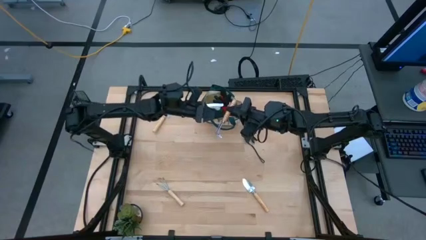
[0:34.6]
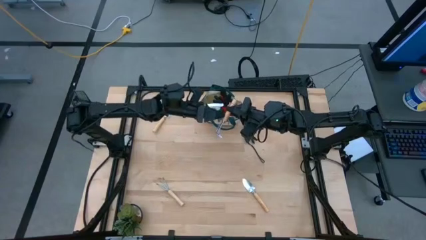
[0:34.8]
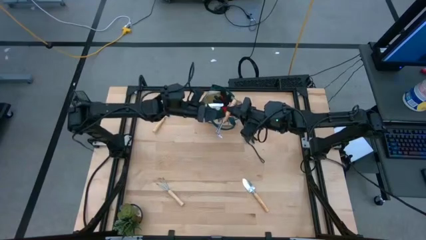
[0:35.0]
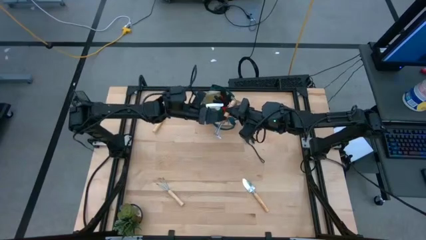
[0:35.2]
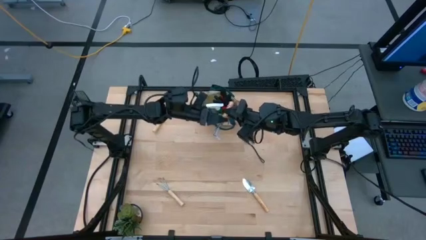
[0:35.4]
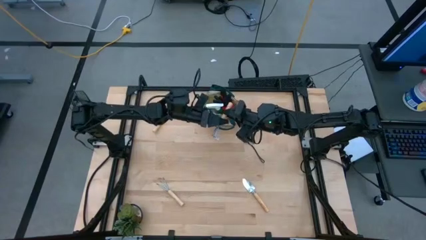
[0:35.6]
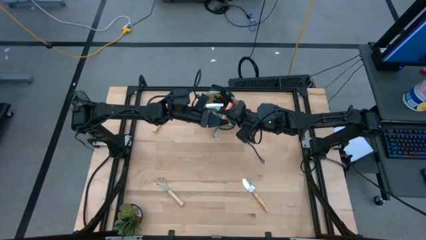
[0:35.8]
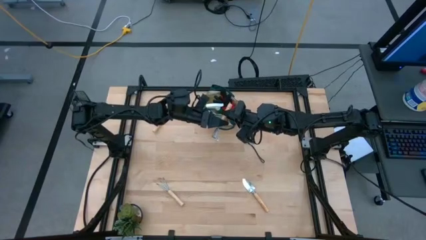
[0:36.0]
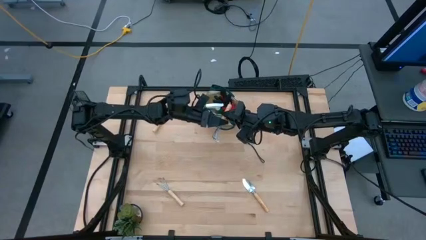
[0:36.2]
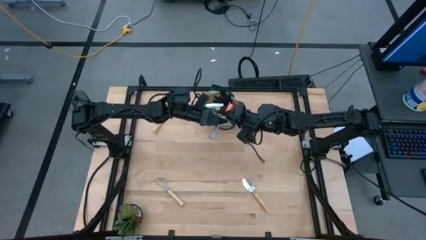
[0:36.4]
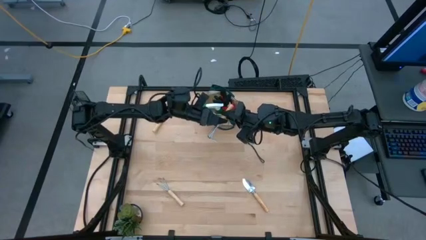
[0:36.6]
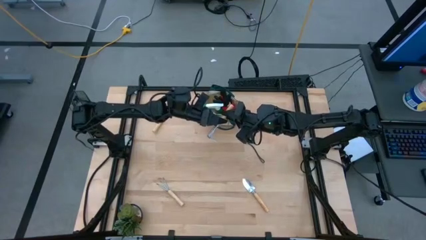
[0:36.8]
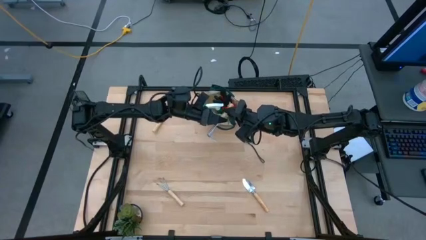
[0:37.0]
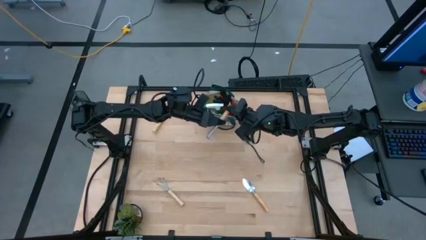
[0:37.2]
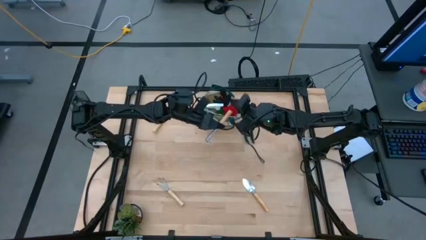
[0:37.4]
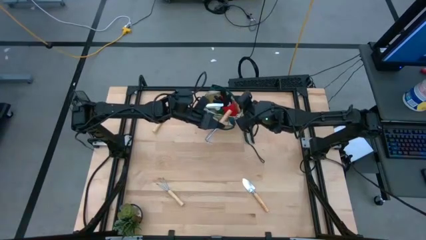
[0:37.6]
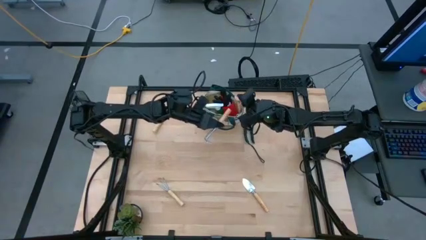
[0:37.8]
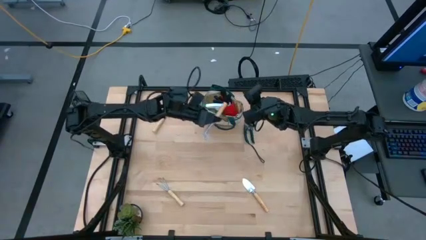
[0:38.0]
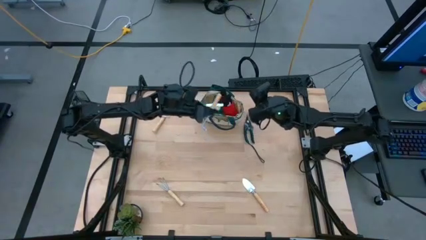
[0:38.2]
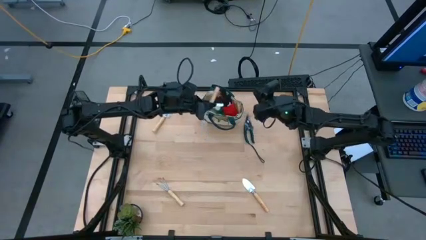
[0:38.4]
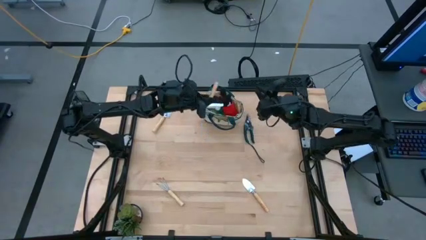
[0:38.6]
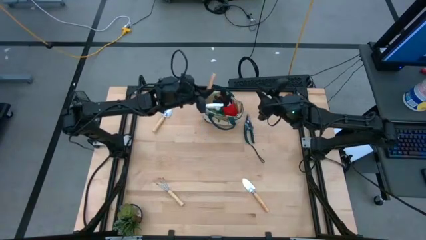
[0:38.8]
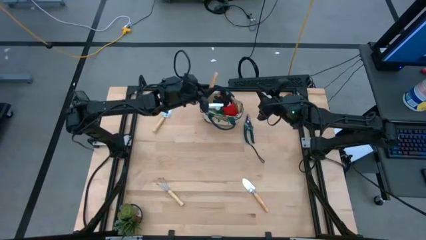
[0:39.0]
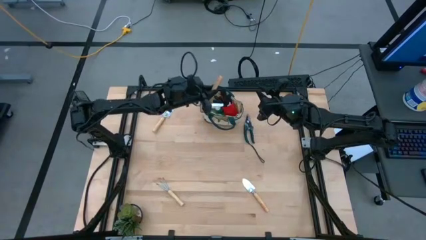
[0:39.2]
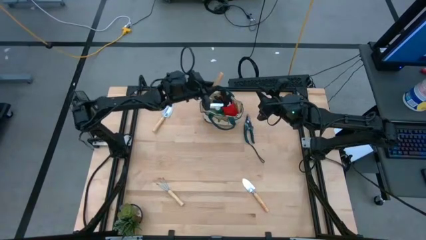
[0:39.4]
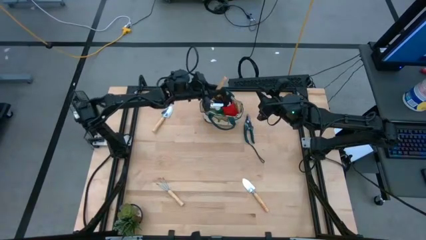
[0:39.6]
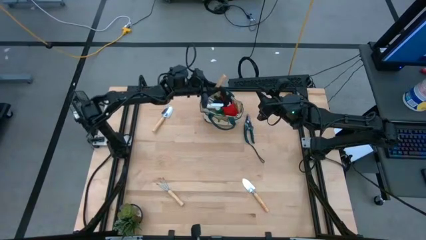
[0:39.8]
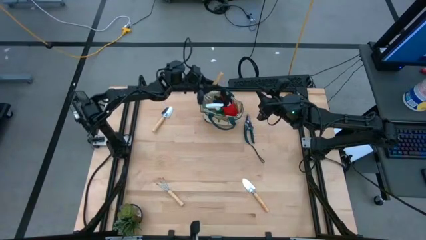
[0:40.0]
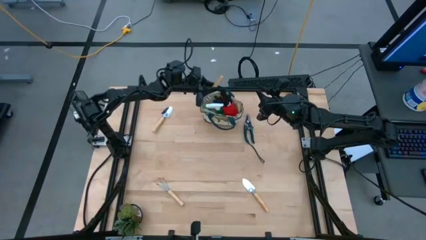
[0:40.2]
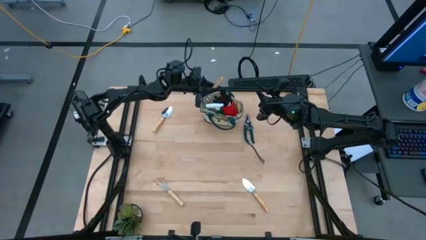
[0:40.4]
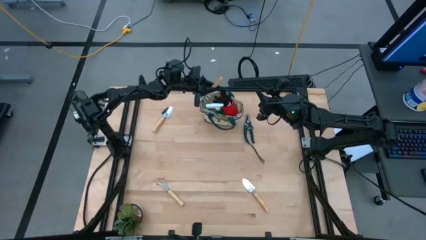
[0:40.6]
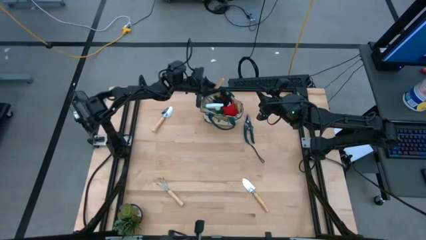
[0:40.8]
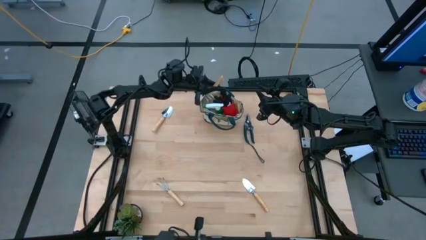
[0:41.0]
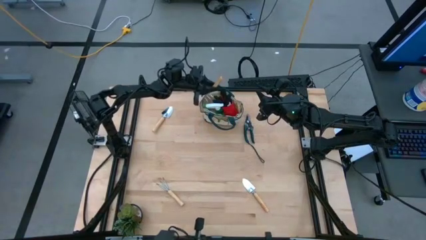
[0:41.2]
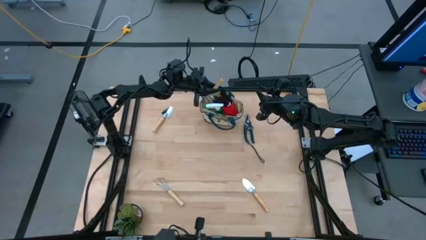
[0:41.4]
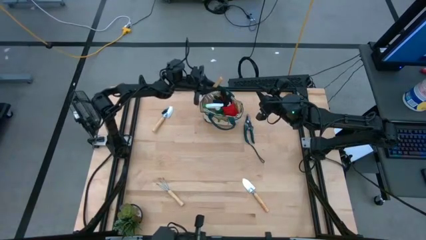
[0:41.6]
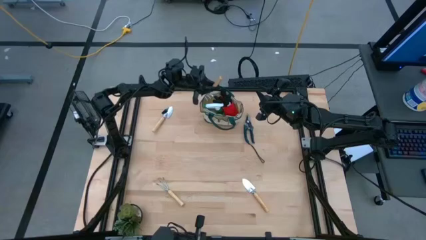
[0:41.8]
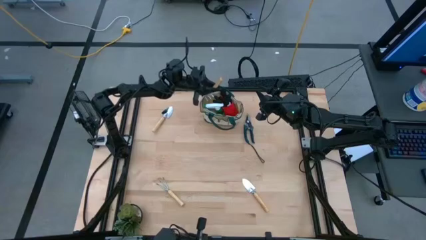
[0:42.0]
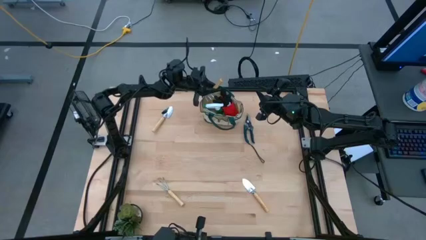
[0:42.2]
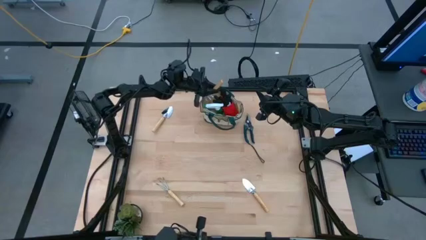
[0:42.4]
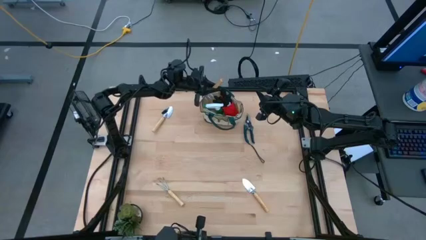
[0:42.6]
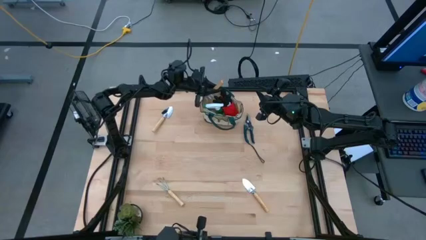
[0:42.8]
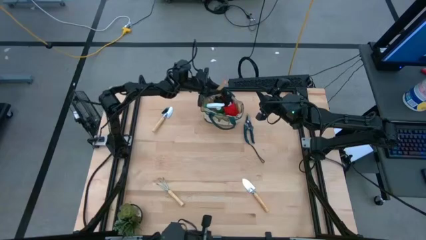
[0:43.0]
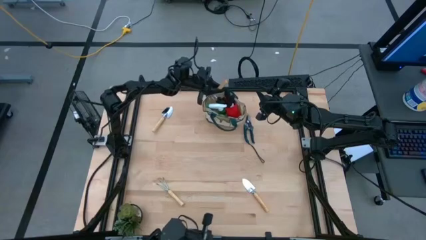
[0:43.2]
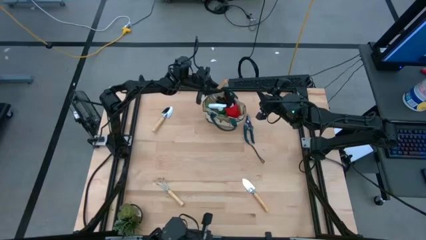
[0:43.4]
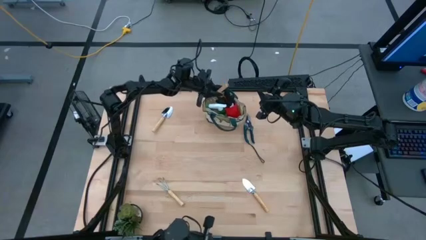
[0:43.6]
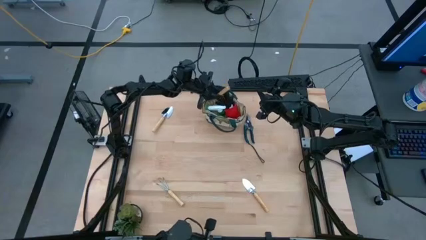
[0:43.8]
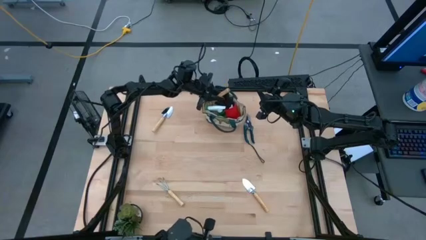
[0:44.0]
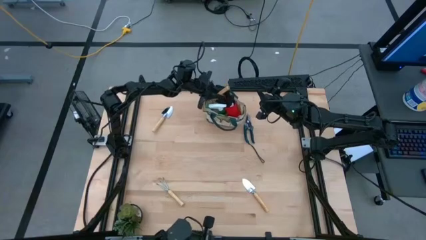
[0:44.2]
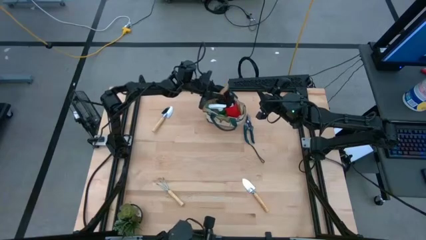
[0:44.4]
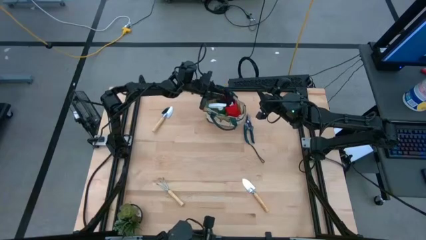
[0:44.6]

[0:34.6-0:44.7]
Task: Pick & Place Garden tools in Gardening bag
Put the right brown hand rake into the green gardening bag

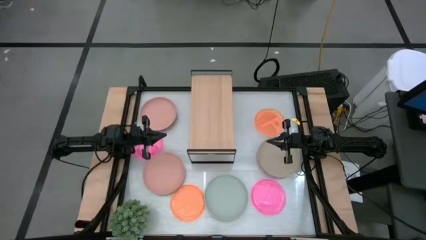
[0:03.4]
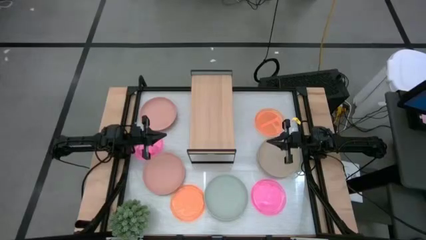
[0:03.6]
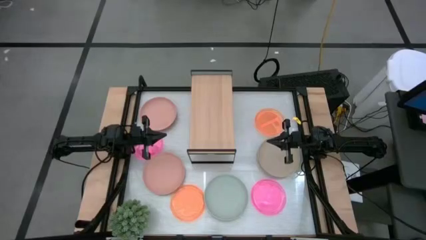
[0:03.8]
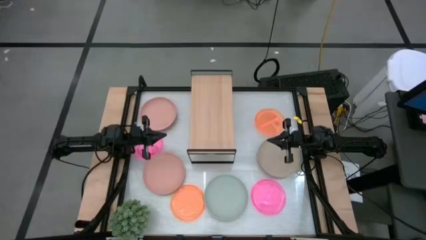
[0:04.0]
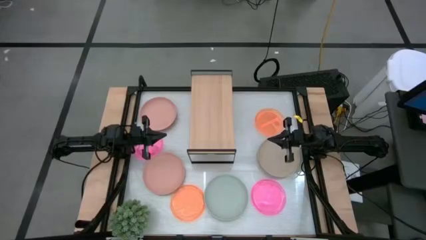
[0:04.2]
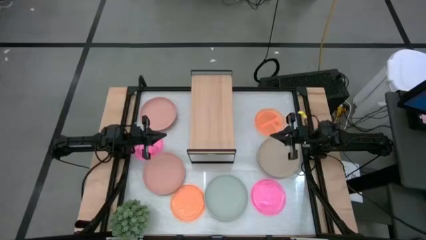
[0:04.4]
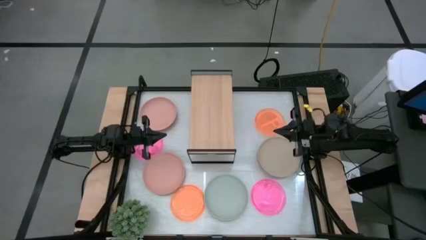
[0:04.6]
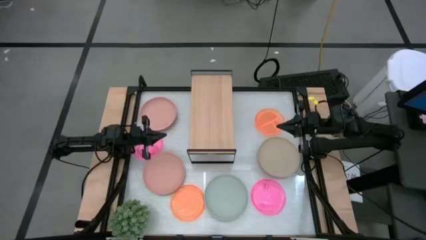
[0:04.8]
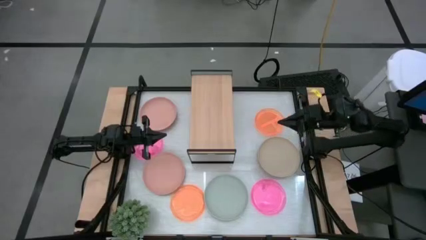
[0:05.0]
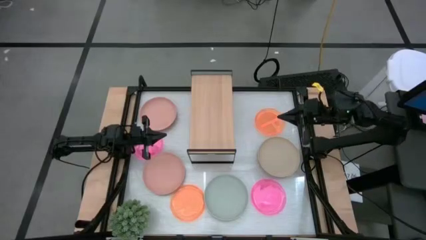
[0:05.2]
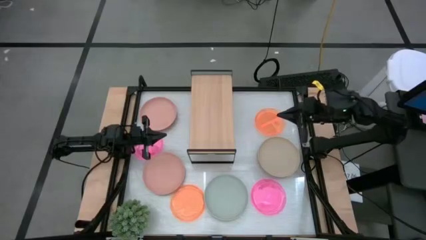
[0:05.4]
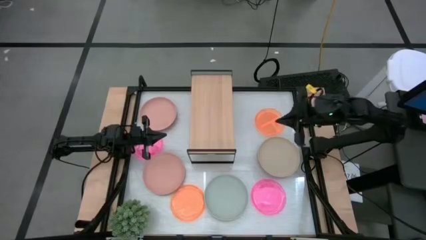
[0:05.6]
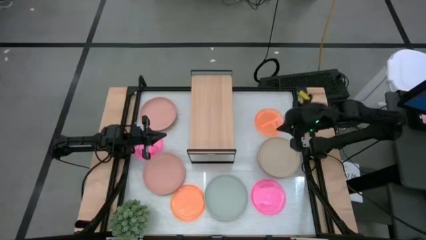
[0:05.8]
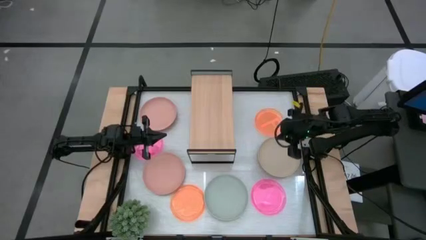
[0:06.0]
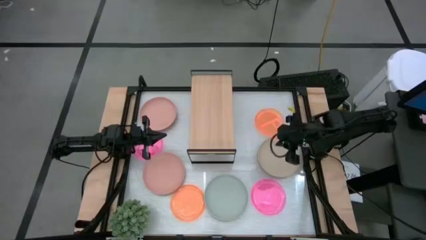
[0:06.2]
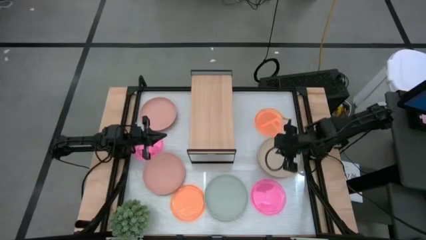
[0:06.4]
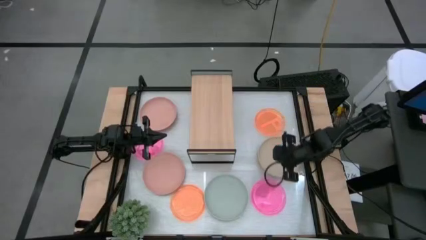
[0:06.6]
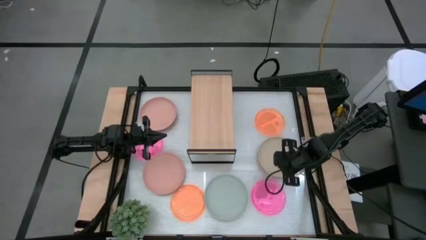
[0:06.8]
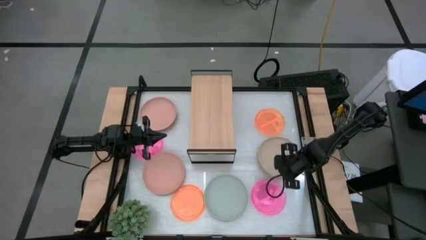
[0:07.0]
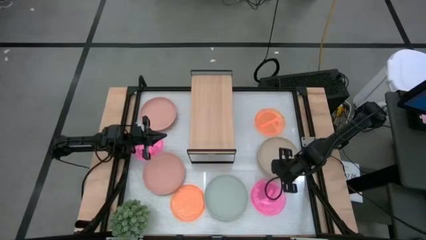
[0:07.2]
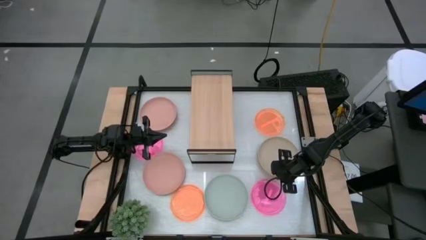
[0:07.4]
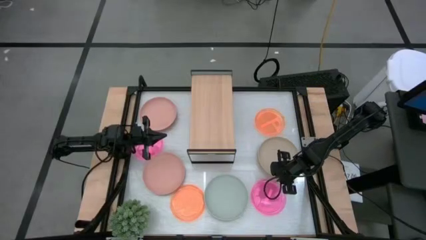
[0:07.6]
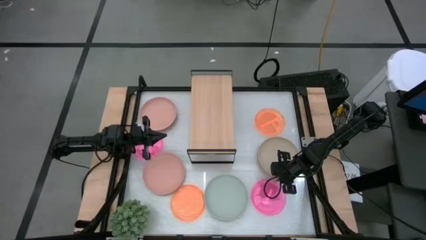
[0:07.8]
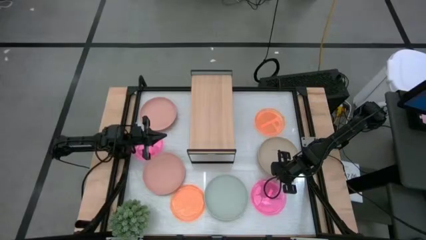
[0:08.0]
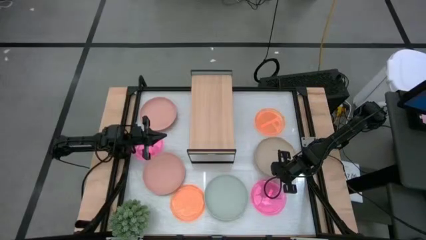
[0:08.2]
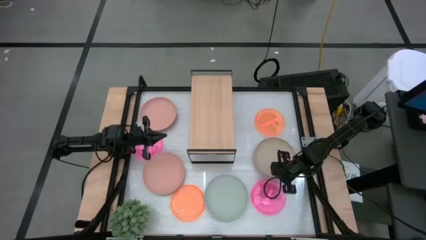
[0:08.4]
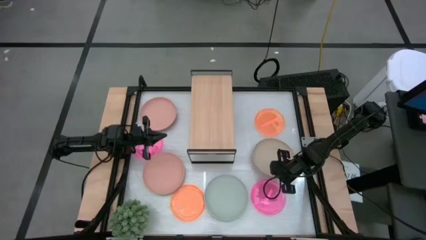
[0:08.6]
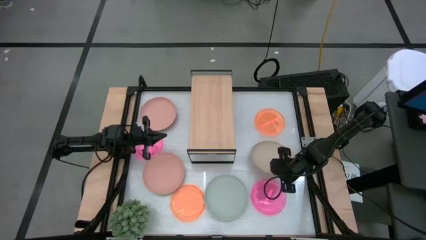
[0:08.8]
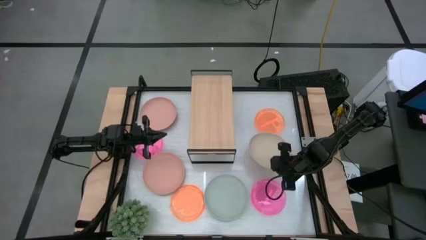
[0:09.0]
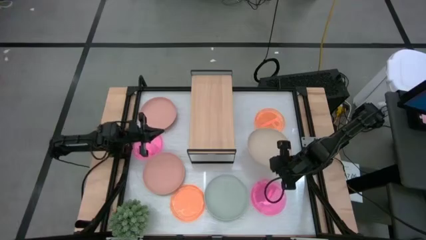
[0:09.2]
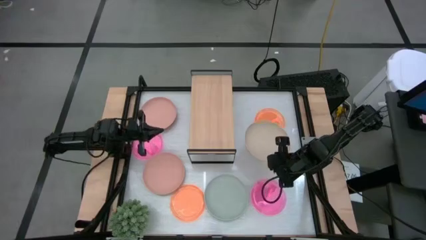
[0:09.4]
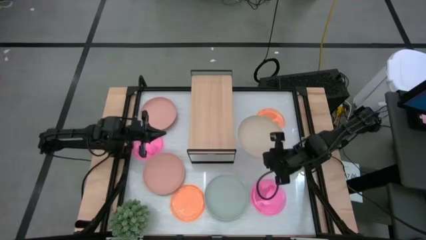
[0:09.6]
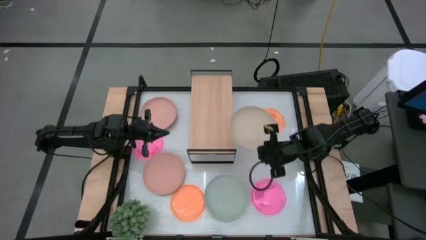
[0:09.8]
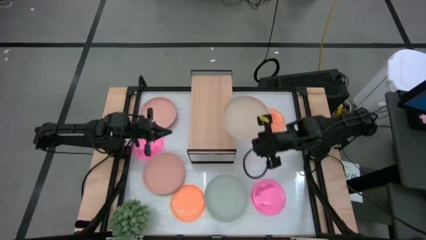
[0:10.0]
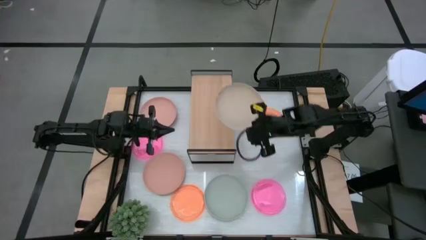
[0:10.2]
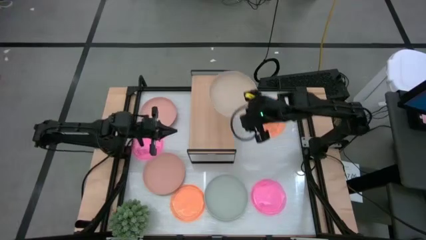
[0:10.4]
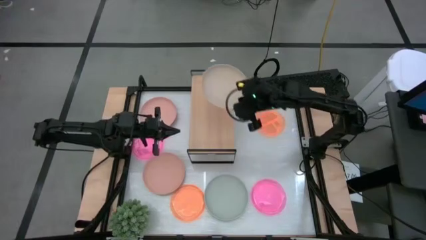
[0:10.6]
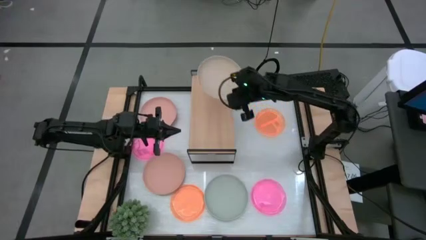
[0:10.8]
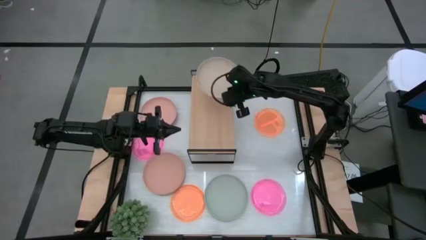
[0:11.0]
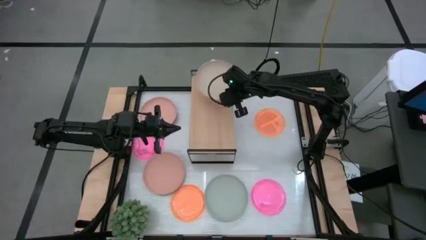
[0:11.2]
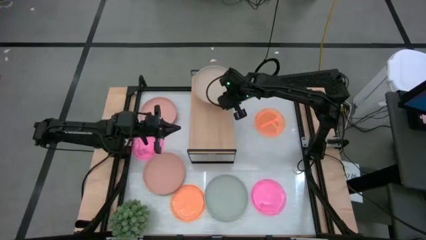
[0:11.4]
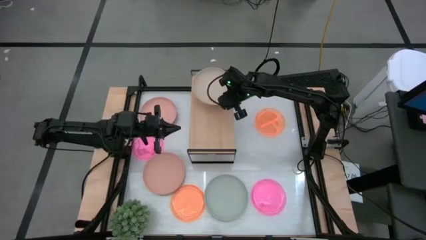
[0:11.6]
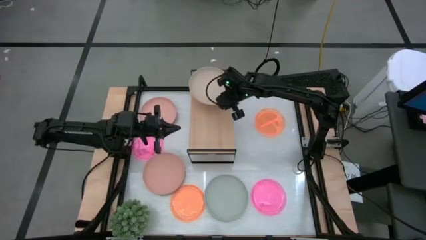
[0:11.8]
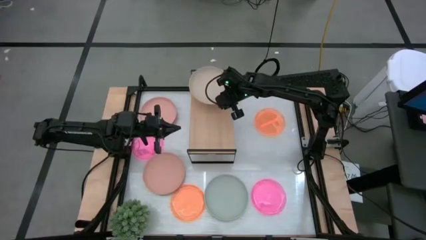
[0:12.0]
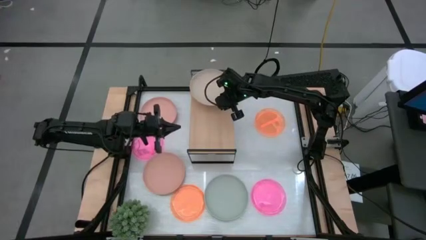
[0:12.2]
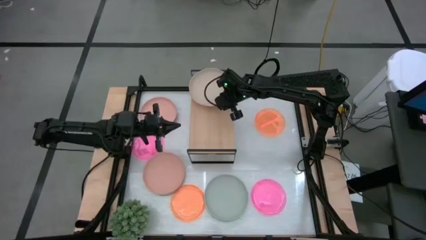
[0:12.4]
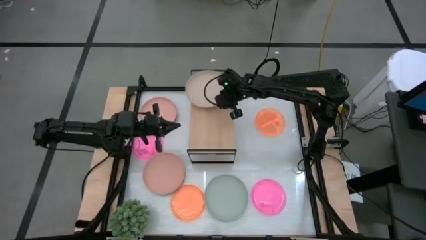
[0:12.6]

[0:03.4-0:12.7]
Task: Place and stack plates onto a shelf
Put the brown plate on the shelf
